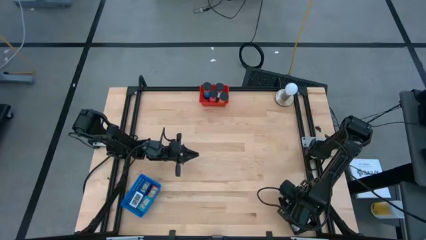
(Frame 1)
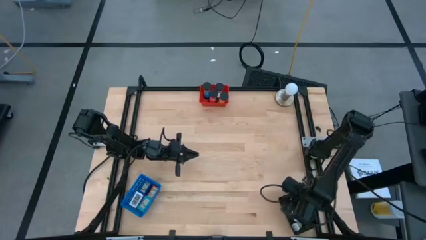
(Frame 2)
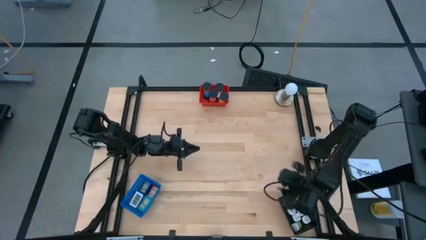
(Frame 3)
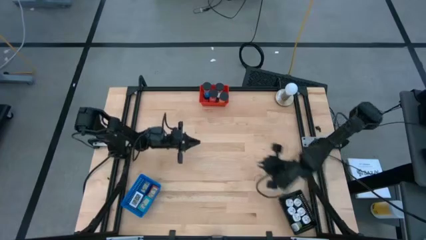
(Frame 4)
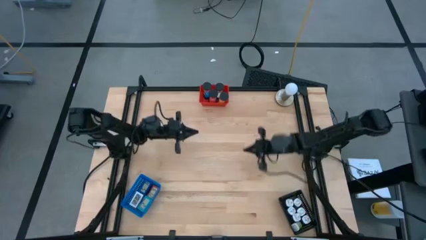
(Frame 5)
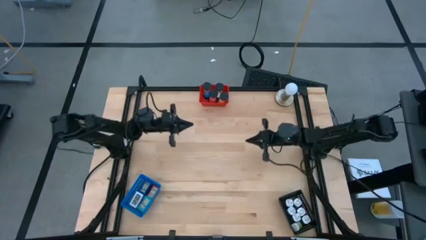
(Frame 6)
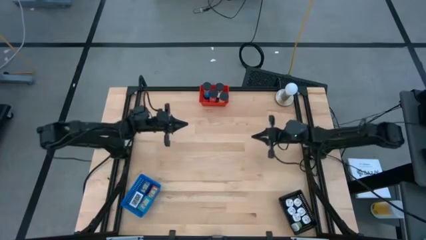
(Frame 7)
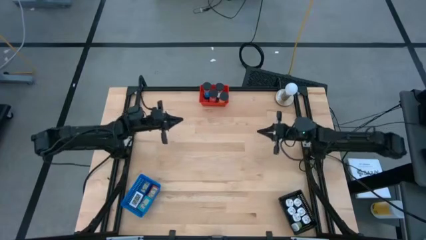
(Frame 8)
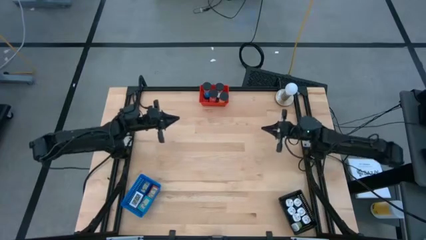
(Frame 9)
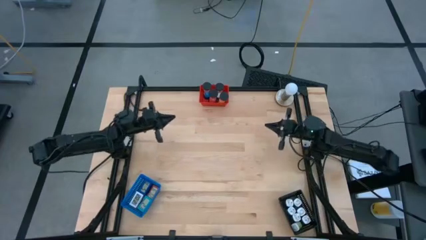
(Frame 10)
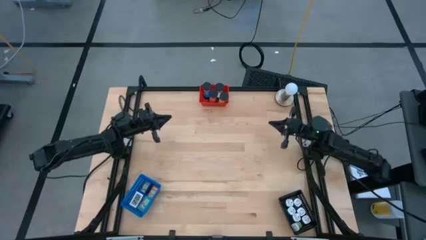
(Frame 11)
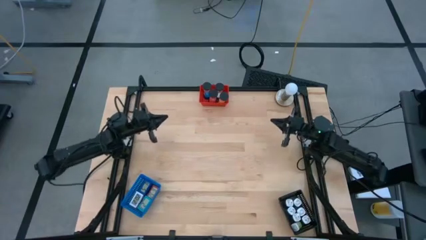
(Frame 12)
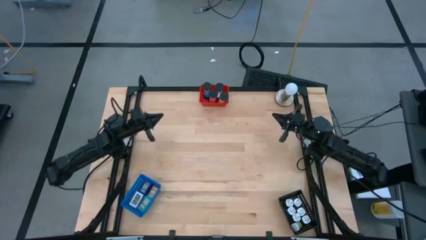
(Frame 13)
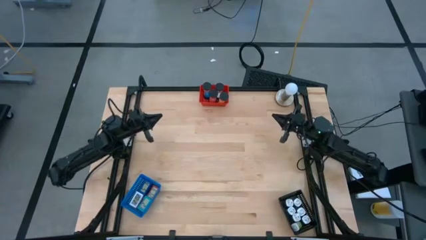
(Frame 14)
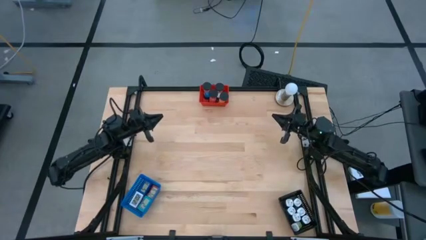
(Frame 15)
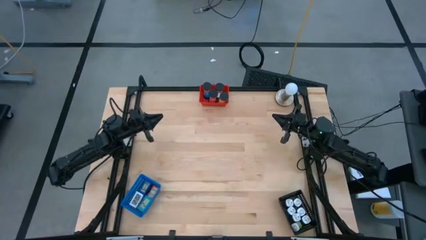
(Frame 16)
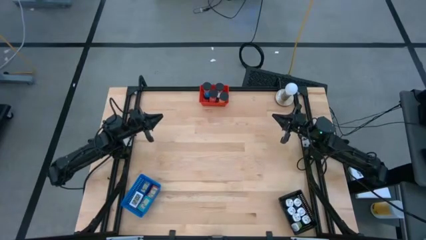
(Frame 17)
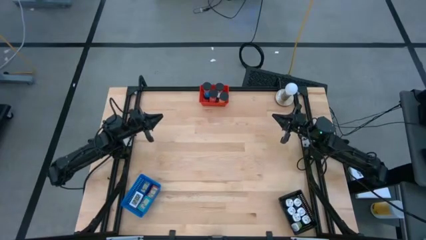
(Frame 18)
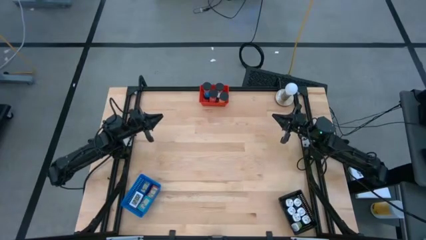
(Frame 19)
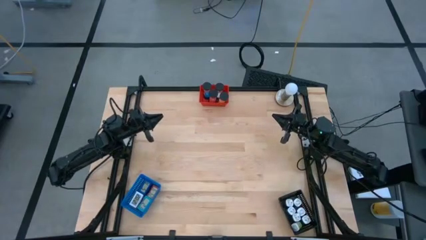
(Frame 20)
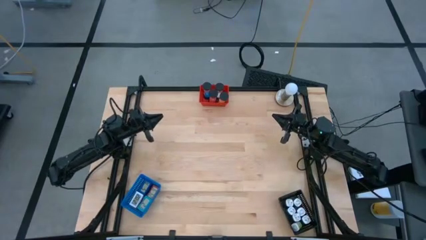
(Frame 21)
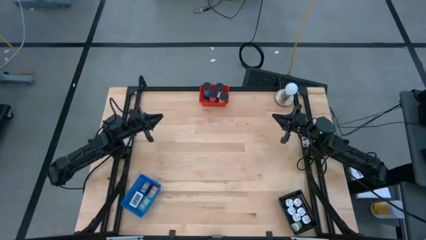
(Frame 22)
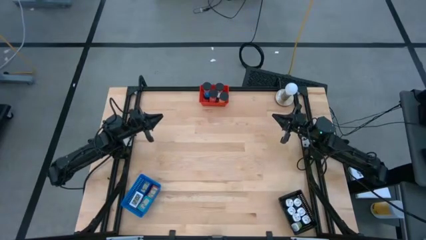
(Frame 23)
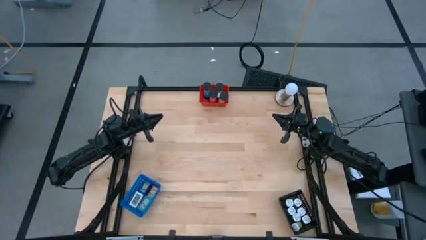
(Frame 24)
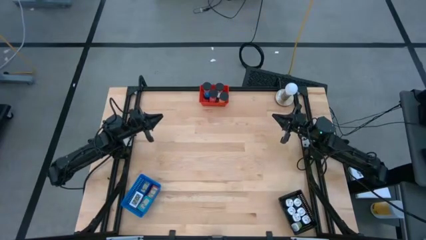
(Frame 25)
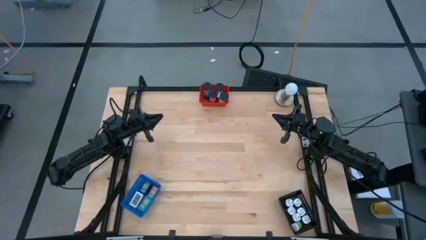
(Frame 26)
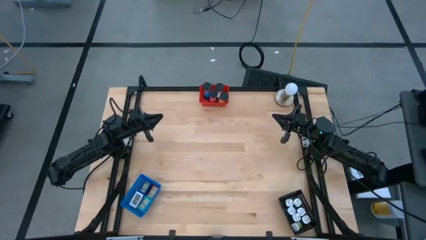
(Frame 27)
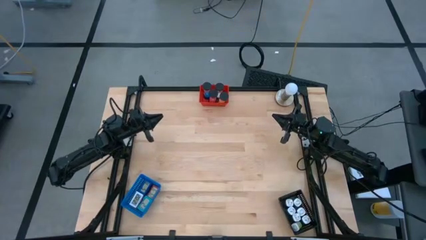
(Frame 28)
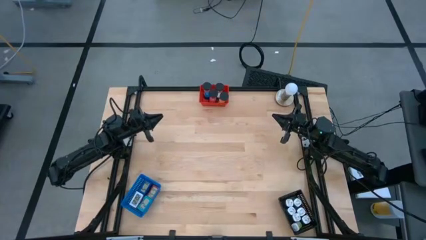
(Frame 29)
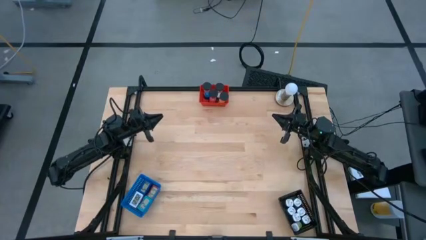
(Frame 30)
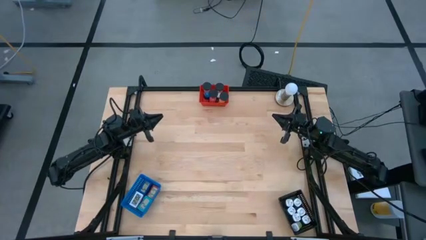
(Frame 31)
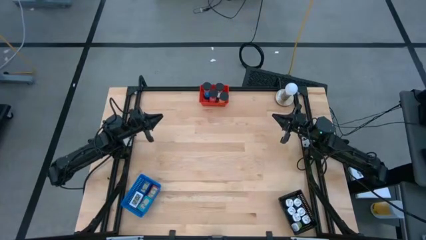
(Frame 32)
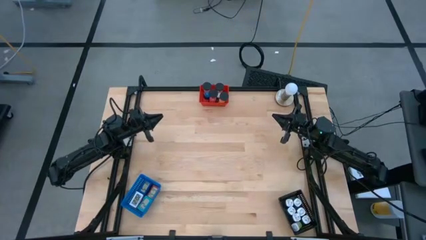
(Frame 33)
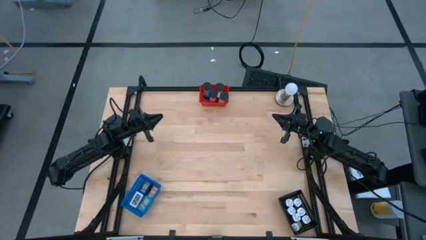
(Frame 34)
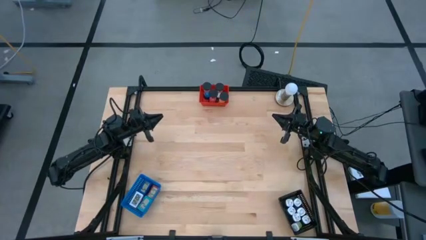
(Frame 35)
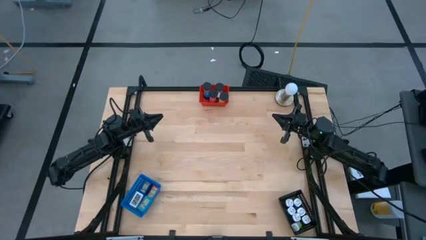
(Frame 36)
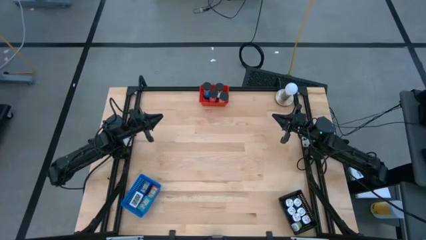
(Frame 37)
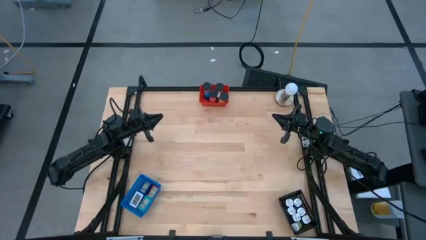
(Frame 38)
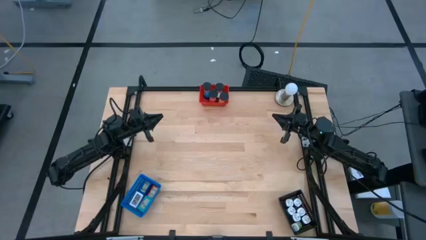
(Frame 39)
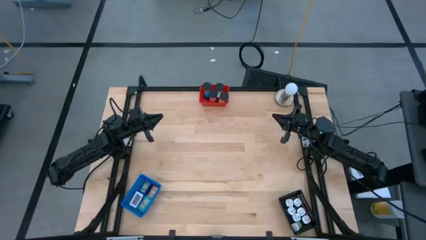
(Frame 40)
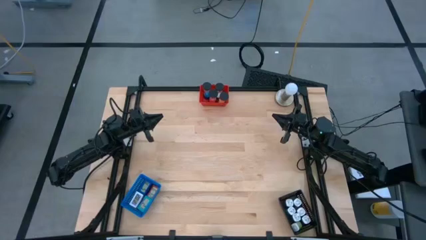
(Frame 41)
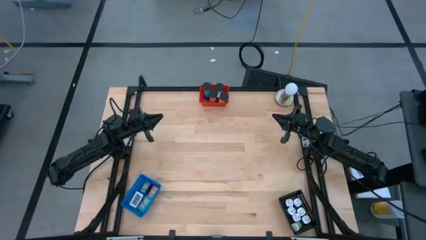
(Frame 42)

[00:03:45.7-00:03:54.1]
Task: Pick & Place Office items
Return to Home Position
